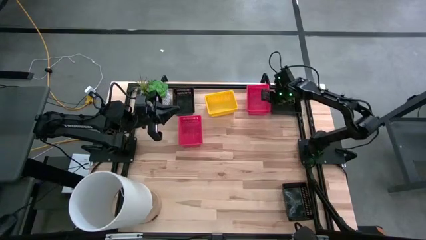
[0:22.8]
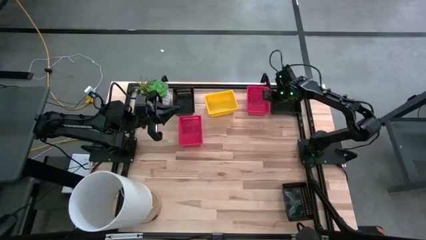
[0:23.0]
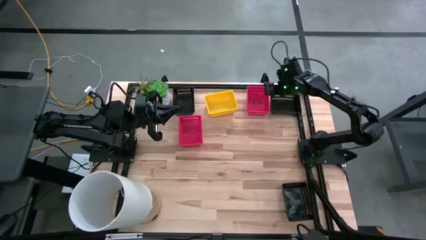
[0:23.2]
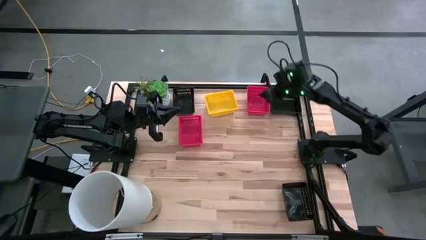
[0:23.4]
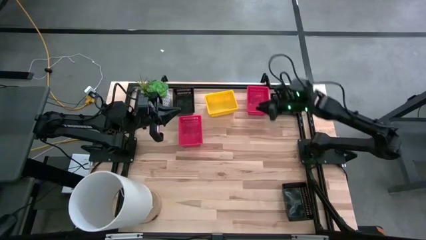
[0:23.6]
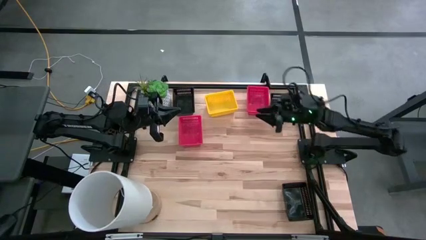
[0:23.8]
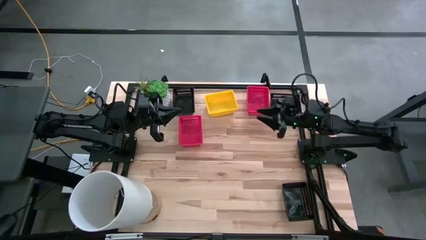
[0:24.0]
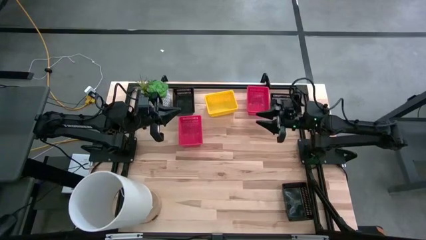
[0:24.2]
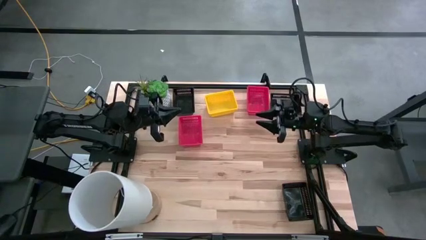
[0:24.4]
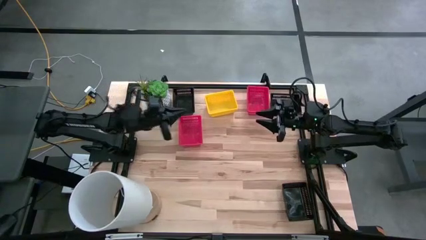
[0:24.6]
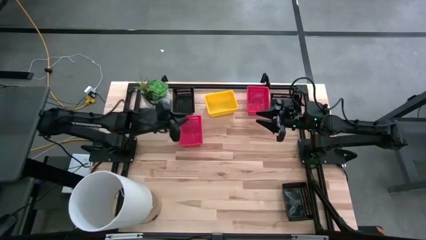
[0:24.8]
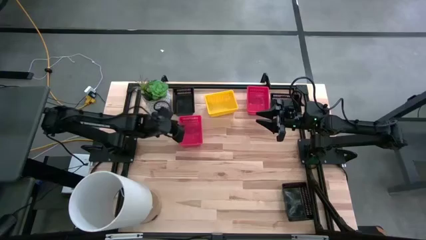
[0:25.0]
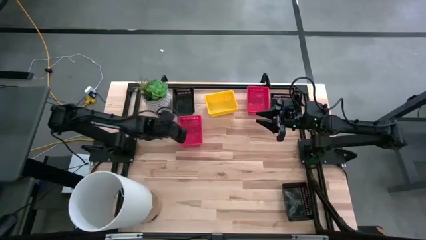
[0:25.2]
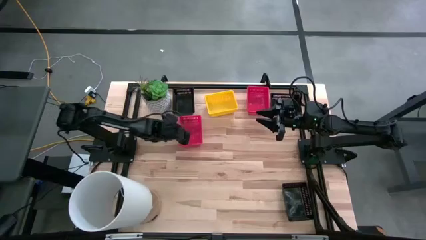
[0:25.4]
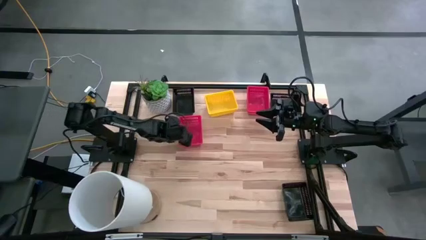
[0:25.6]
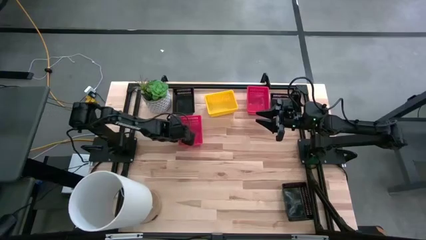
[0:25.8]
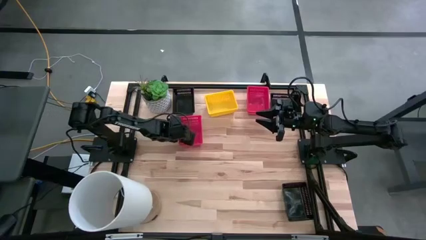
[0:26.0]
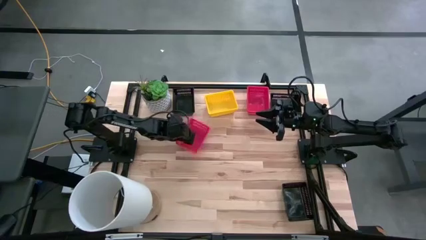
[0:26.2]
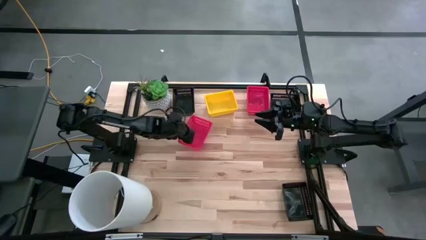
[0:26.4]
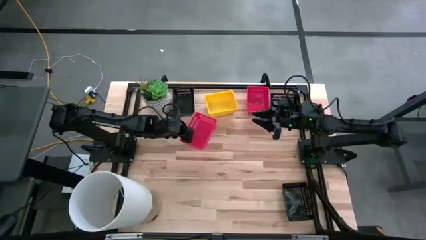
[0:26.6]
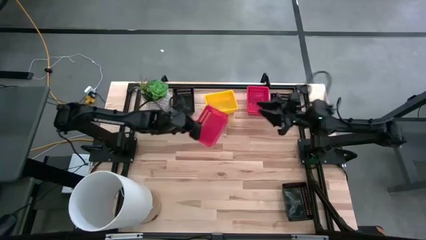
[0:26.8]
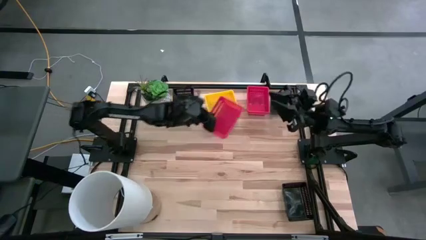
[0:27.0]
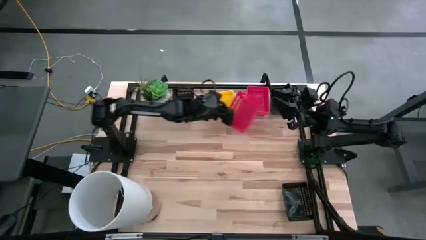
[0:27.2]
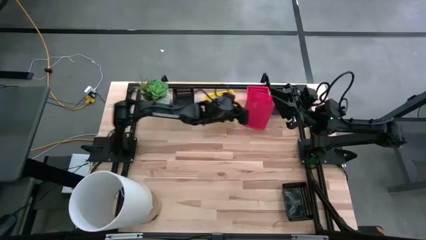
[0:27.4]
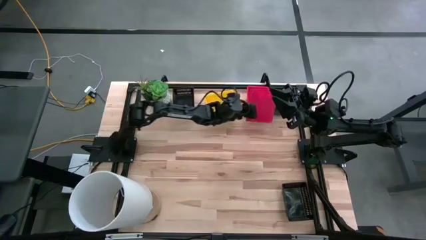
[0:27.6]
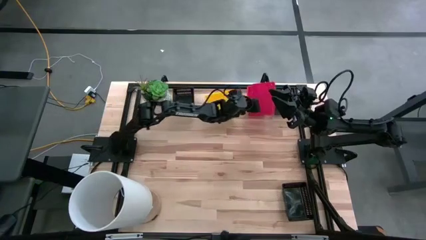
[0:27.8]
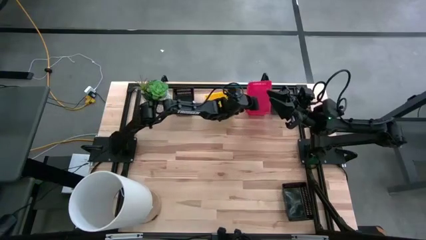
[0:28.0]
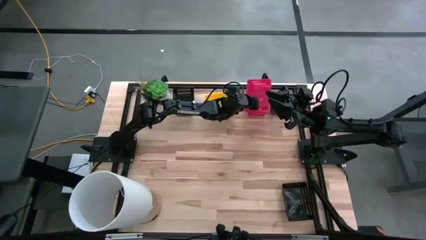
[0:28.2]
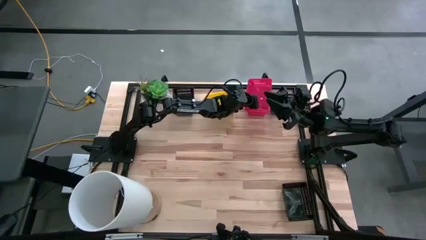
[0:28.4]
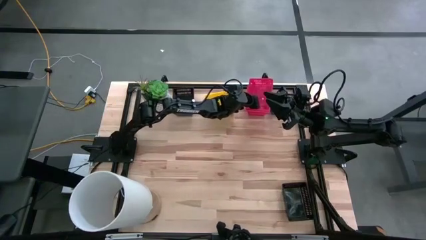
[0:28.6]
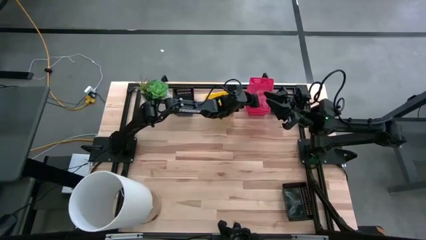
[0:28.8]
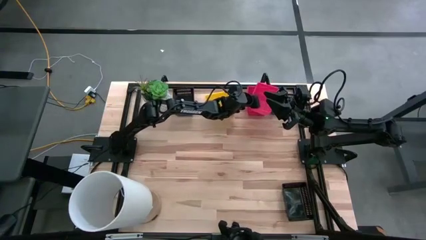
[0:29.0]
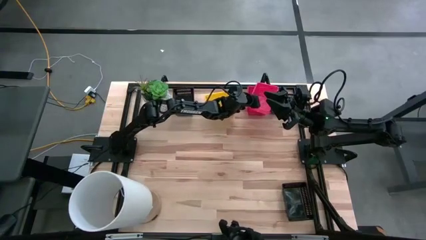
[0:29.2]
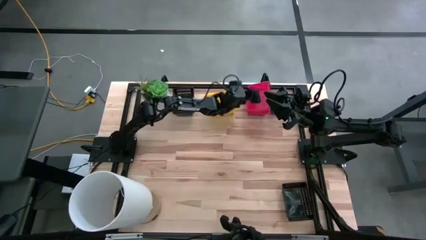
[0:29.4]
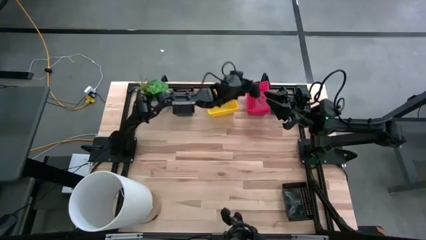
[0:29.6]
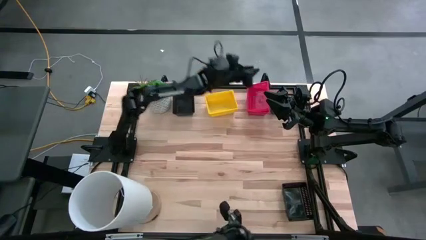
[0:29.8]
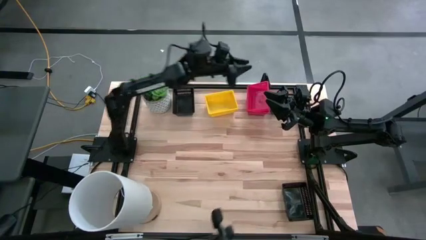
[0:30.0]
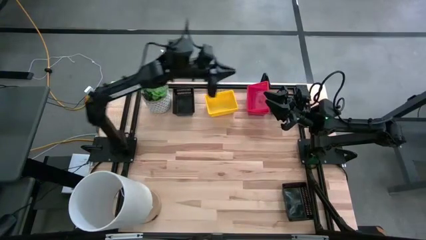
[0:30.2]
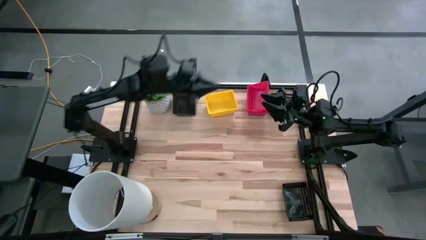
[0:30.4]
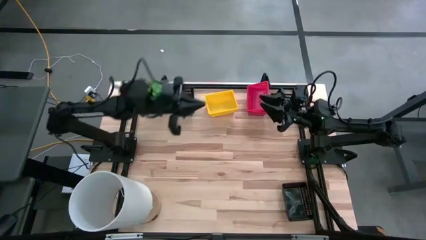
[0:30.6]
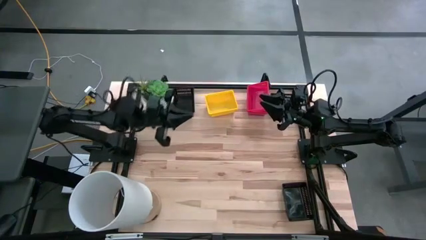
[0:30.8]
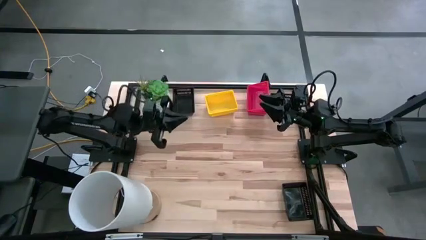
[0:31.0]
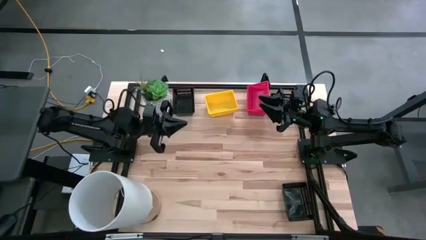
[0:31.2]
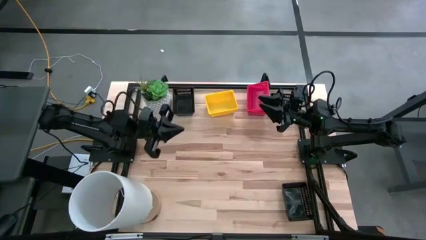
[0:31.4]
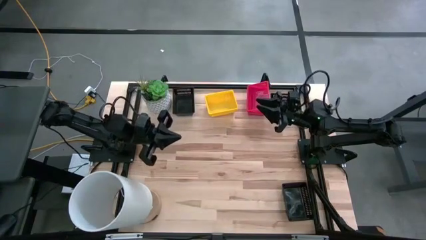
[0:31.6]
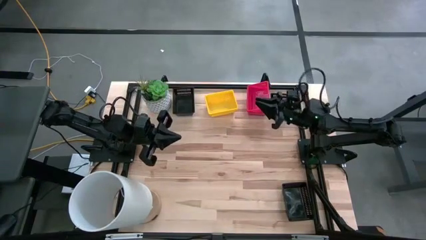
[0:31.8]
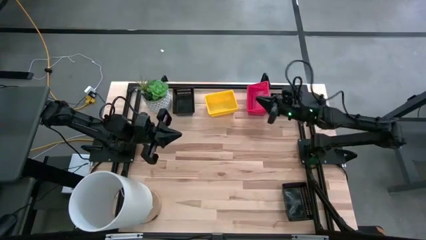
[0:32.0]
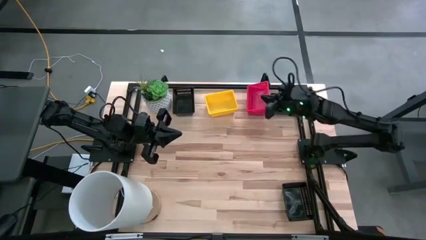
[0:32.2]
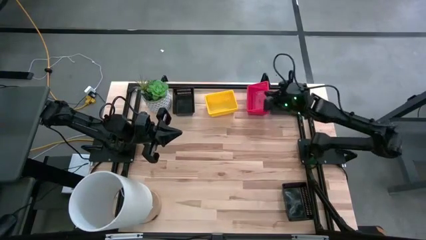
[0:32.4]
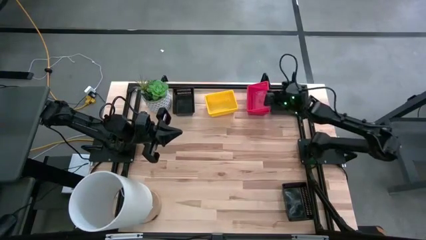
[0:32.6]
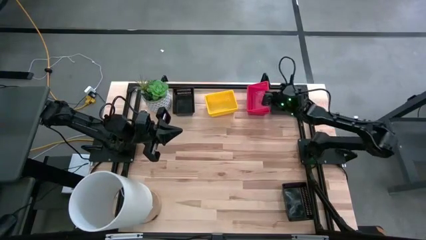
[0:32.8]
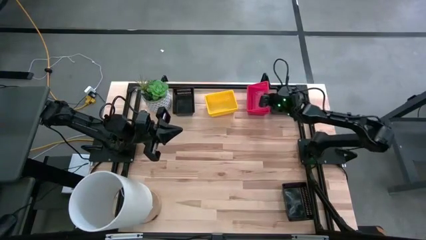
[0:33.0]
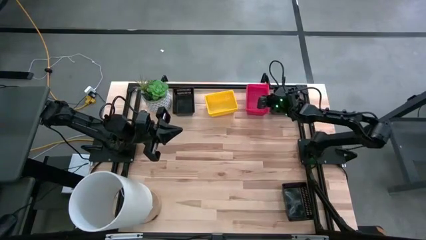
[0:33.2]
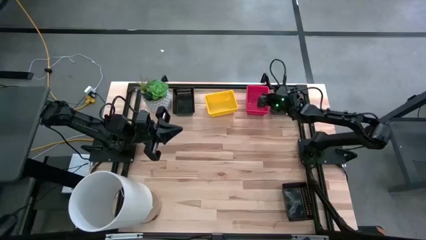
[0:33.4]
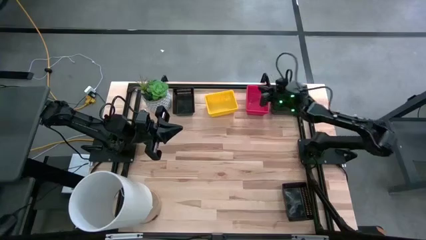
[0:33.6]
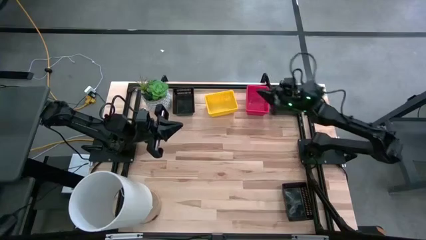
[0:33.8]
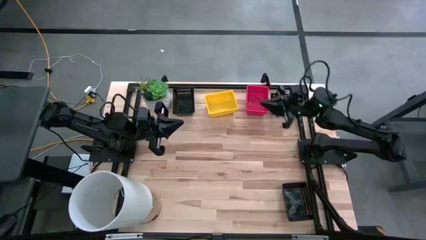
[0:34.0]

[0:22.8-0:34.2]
Stack the left red bin on the right red bin

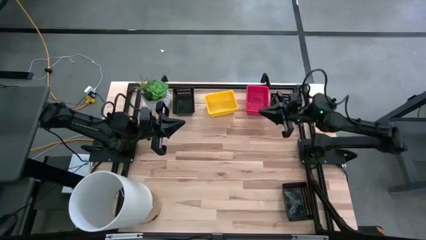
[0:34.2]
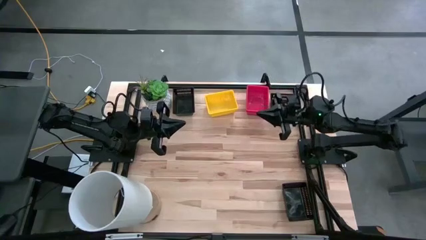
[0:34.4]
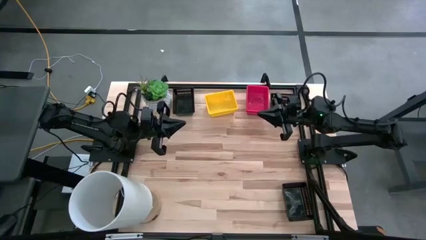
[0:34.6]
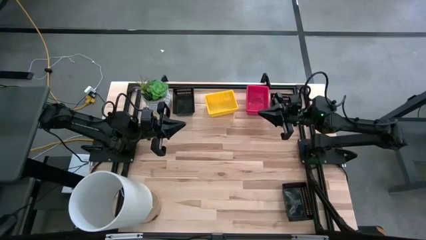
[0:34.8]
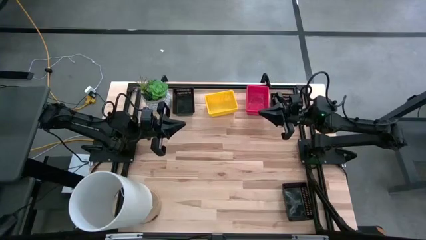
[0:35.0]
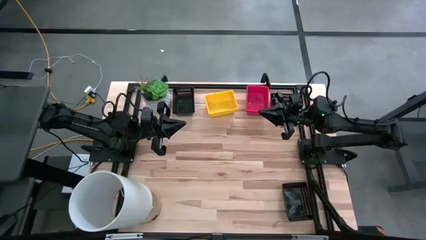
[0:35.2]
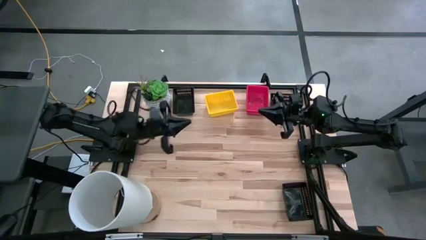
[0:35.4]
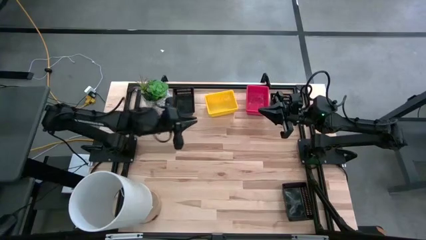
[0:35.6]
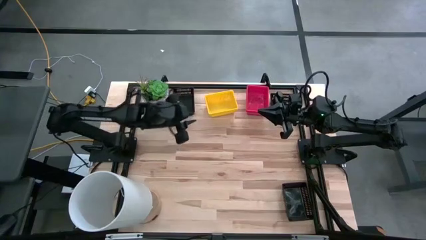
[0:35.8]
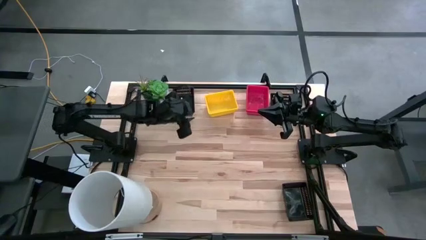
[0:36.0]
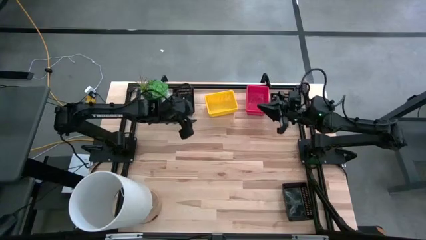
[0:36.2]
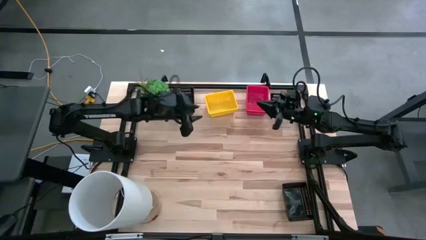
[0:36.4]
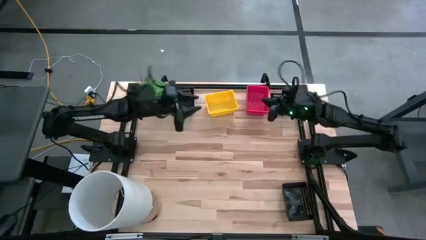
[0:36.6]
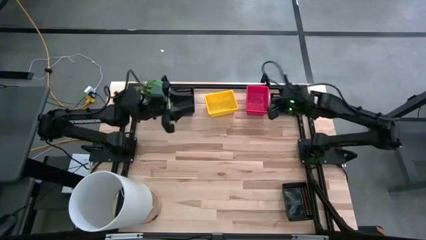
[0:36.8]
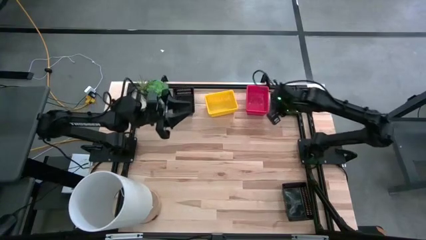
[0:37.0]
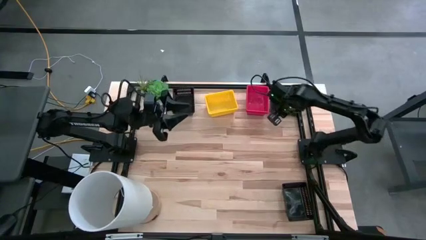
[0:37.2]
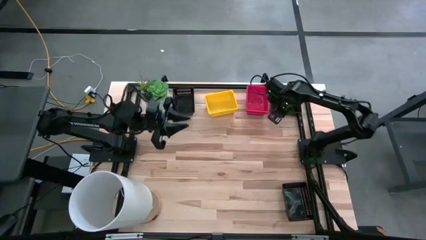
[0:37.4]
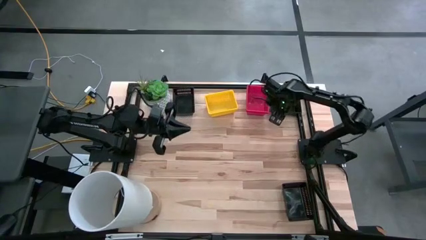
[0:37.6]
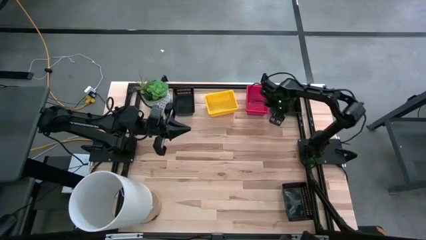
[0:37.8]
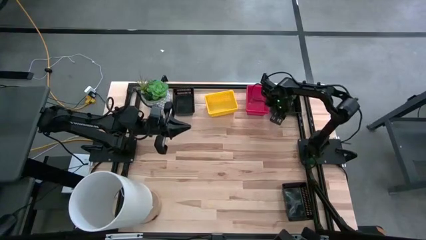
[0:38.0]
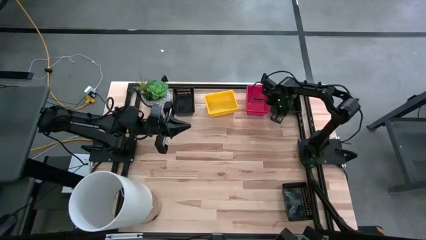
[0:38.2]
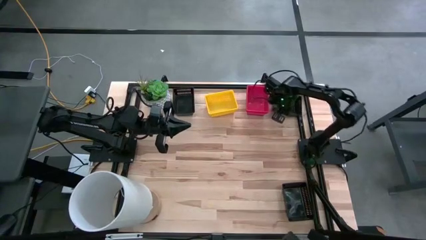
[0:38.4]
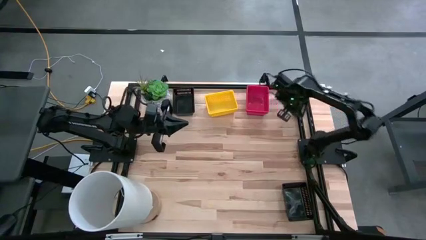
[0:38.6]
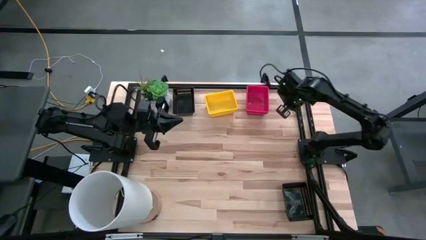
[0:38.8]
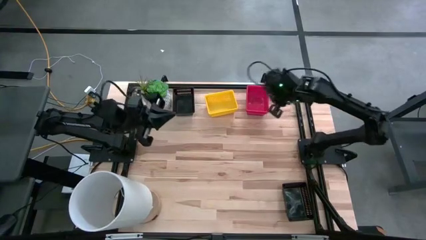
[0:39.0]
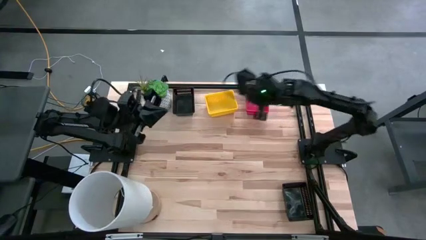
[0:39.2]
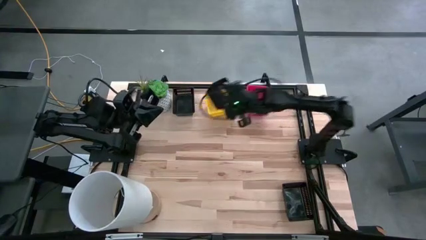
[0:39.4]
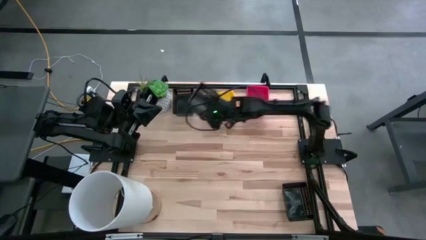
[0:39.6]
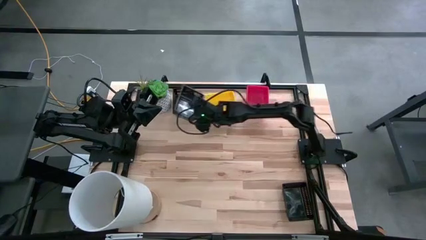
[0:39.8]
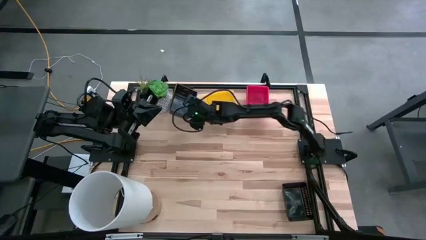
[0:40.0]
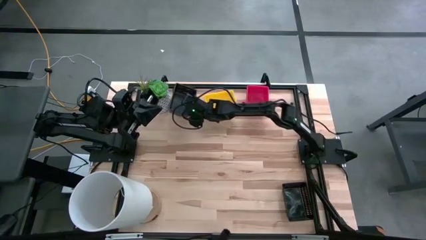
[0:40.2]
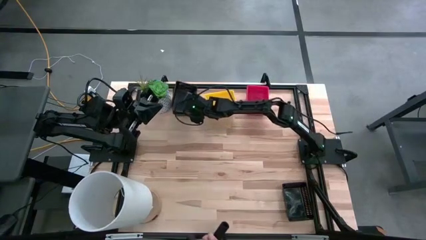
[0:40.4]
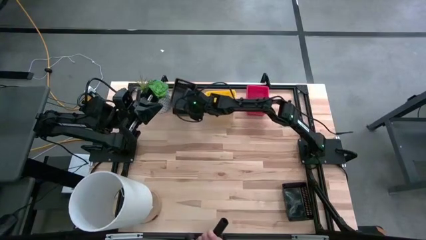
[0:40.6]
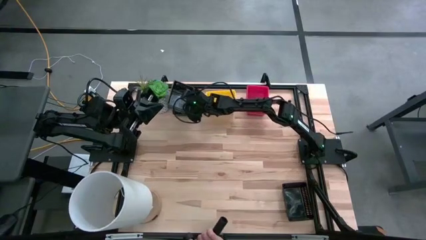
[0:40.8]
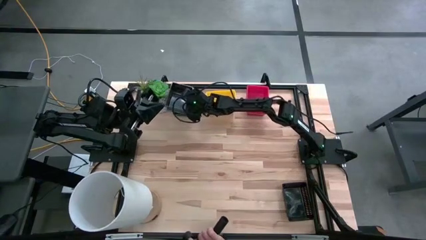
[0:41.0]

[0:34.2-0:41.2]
Stack the top right black bin on the left black bin
